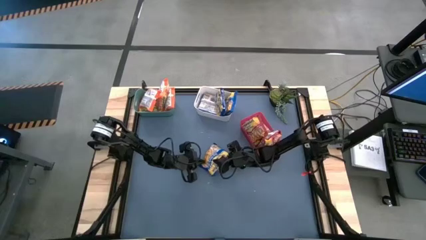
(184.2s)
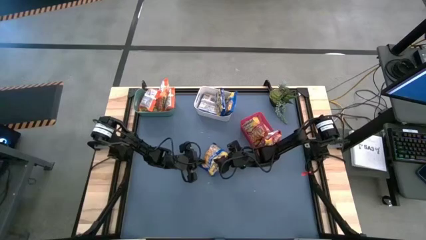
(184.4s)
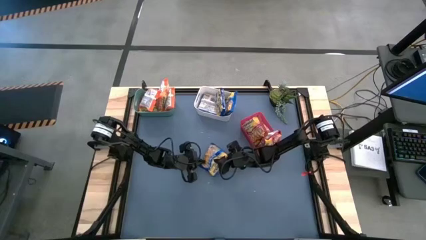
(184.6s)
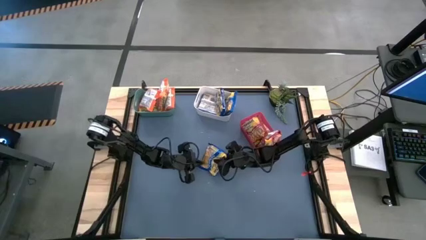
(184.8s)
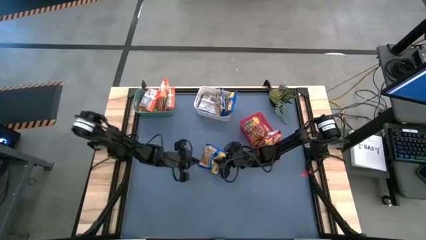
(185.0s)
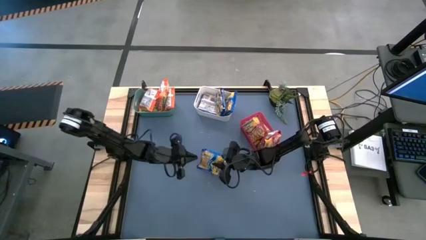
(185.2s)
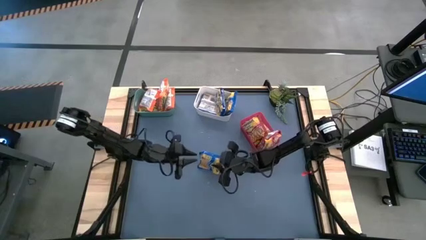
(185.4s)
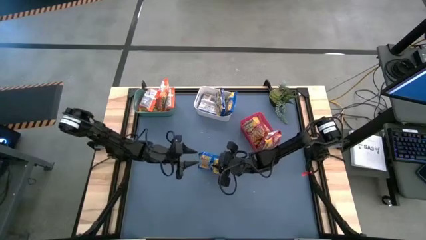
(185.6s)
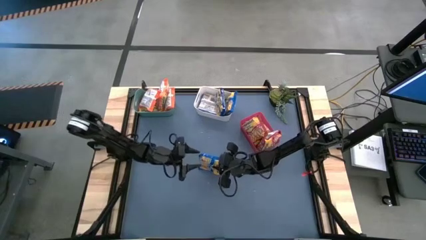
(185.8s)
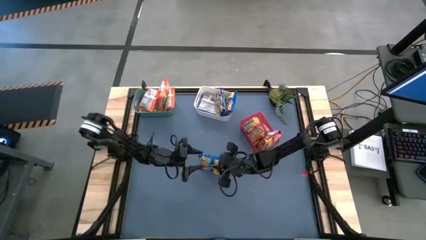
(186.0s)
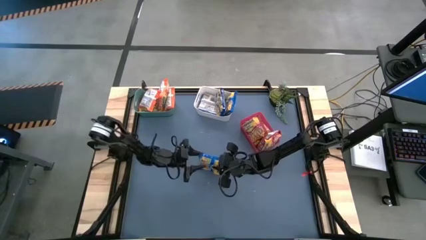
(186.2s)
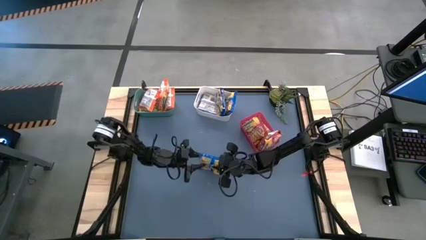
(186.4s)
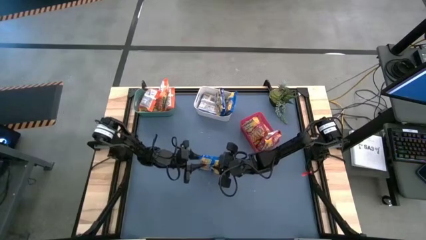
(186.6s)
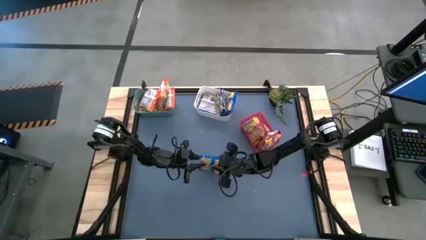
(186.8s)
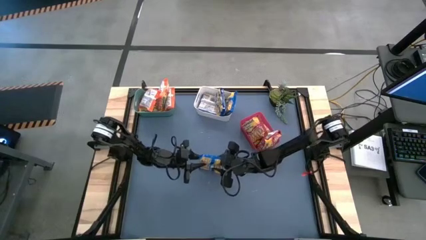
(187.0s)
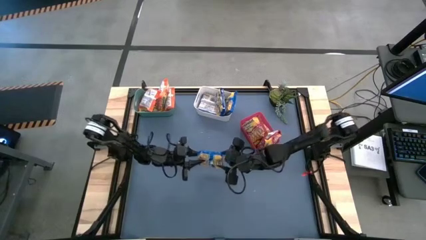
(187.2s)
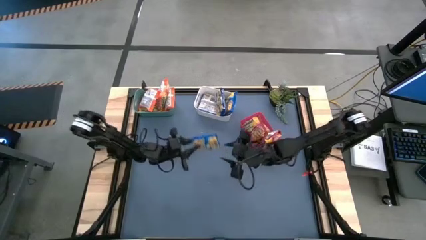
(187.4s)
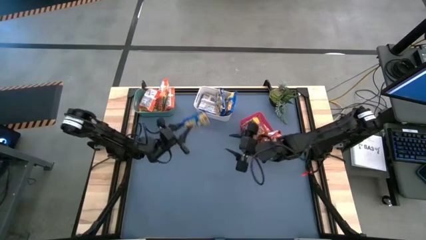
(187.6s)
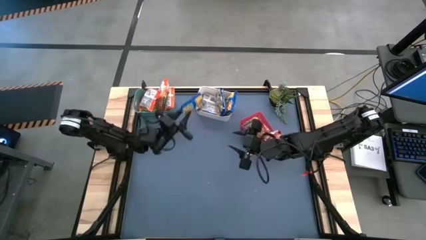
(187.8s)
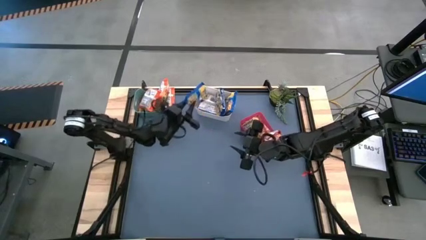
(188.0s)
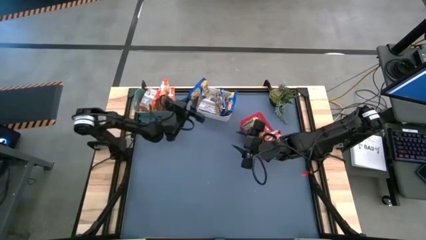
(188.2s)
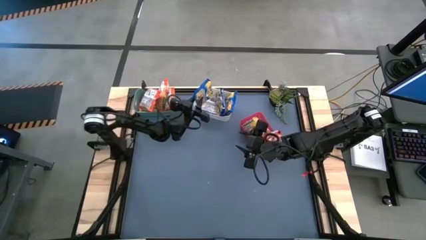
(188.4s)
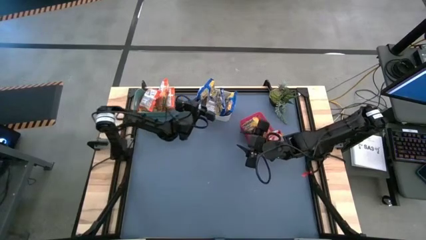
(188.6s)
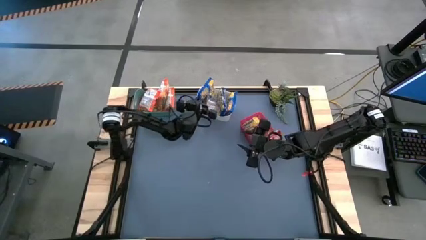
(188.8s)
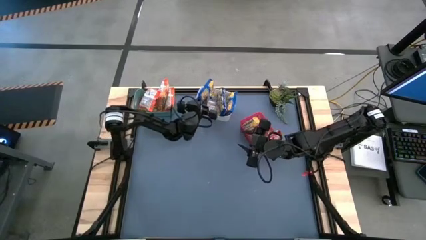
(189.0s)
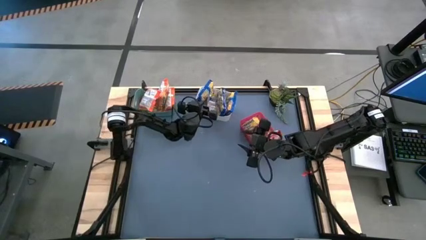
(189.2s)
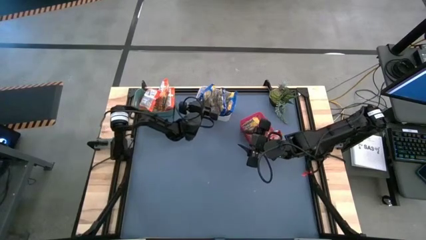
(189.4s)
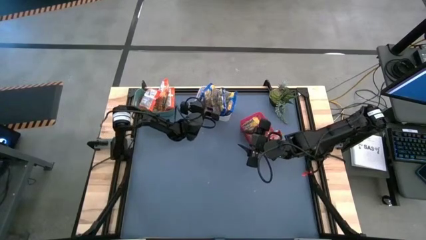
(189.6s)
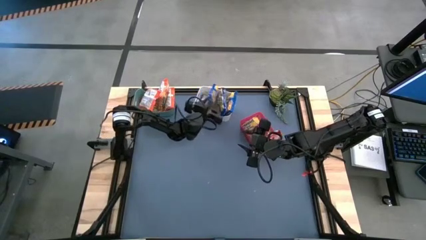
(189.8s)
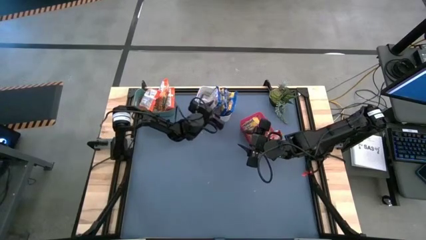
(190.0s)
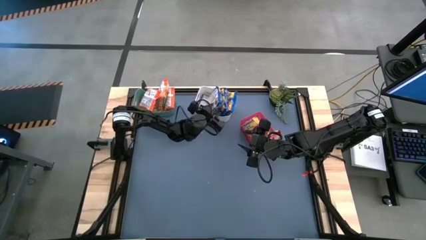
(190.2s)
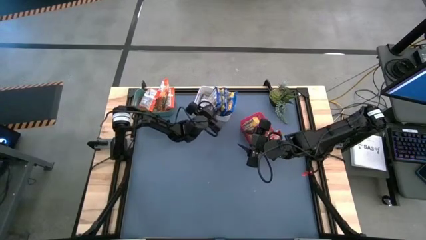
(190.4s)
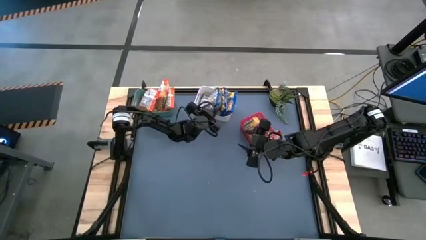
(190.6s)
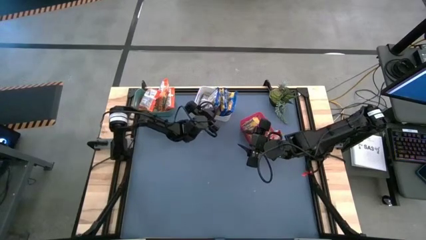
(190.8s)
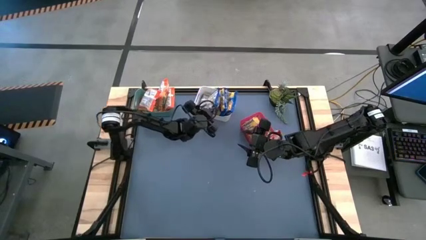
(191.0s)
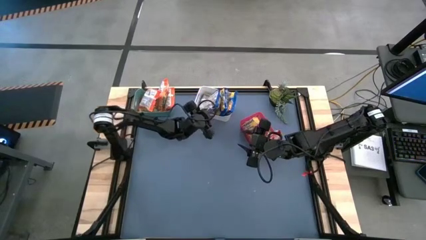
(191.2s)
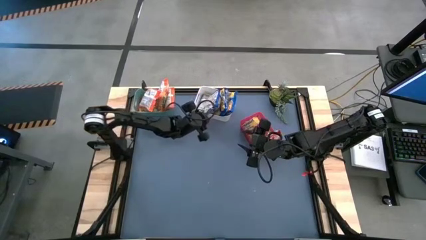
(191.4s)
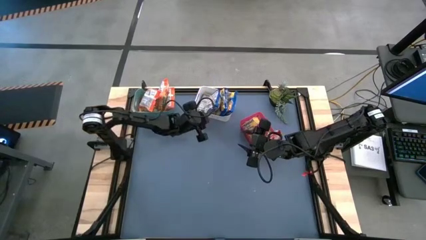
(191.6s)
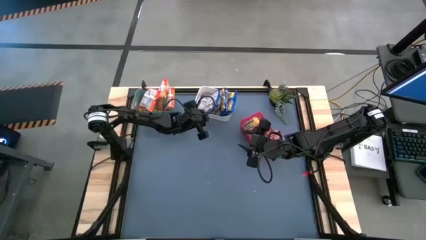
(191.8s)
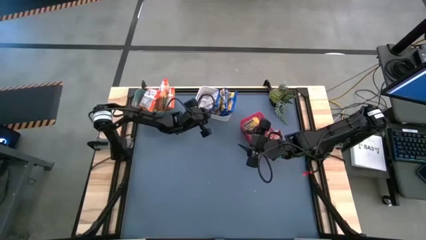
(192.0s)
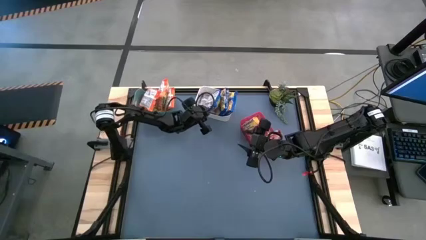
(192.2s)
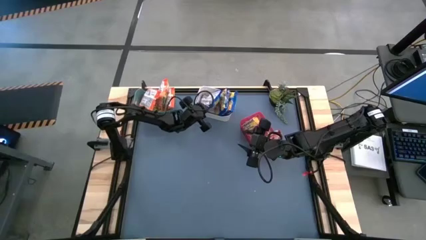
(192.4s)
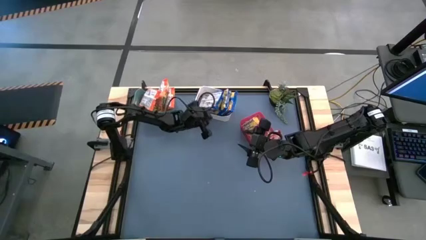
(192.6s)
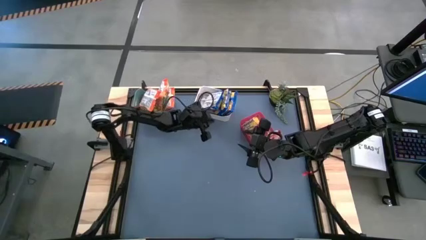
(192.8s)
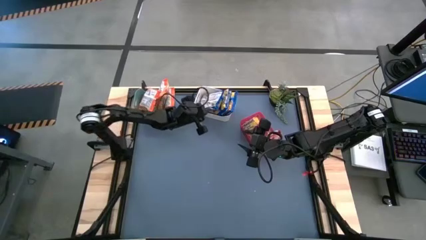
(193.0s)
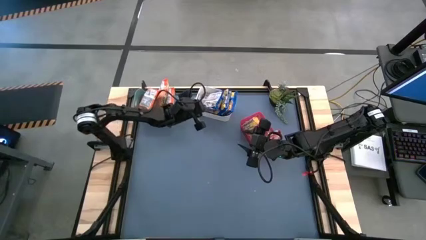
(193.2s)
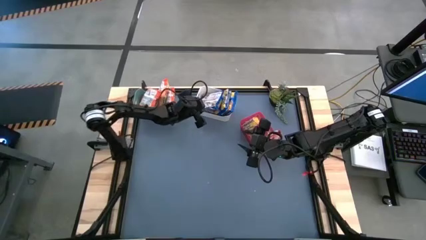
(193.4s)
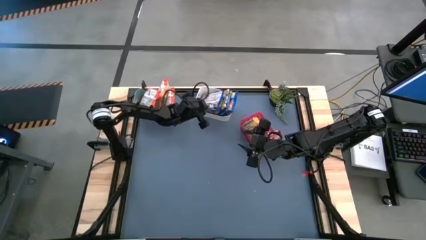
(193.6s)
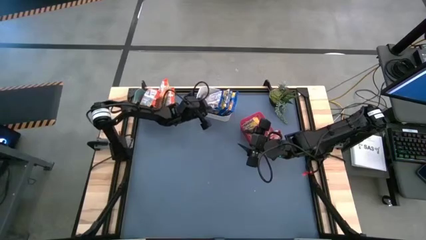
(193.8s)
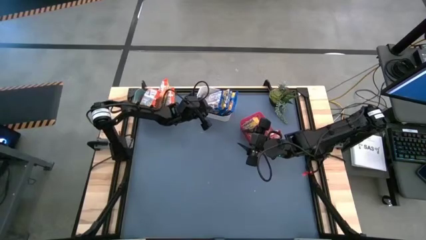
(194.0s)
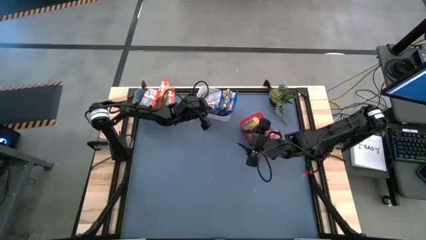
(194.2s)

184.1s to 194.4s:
Task: Sort Maruchan noodles
Put the blue noodle pack into the white bin

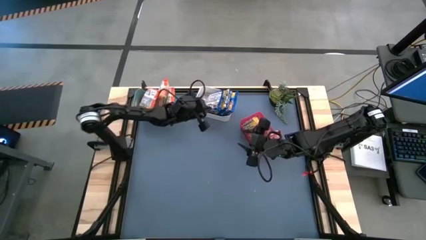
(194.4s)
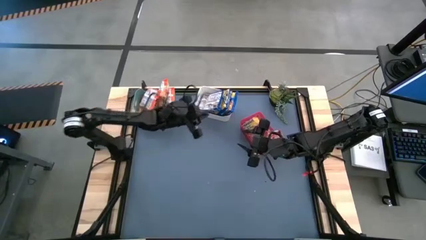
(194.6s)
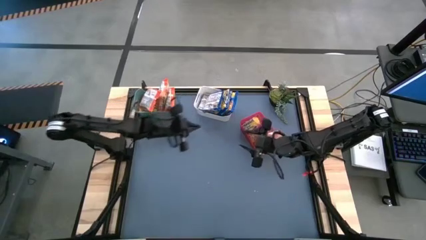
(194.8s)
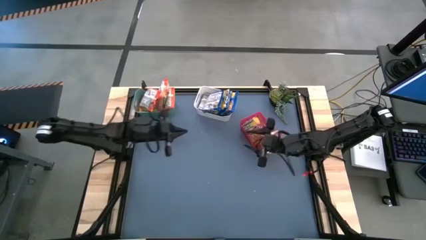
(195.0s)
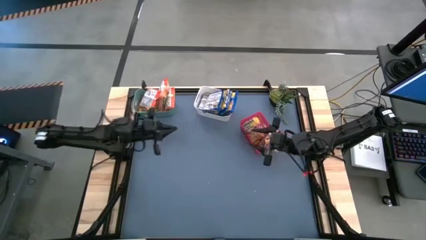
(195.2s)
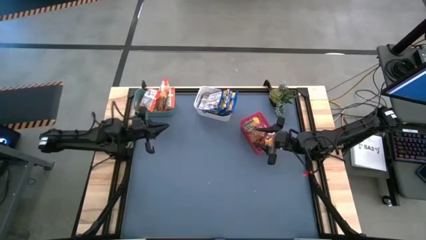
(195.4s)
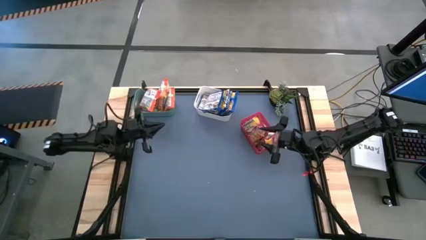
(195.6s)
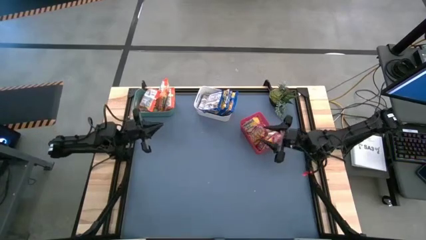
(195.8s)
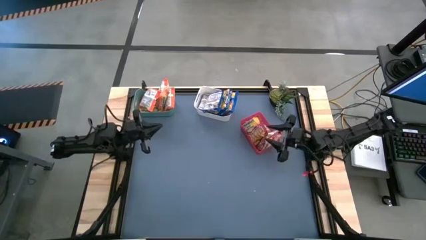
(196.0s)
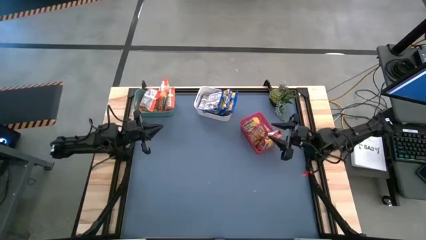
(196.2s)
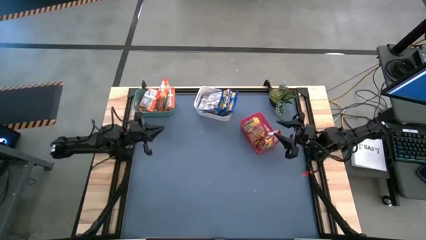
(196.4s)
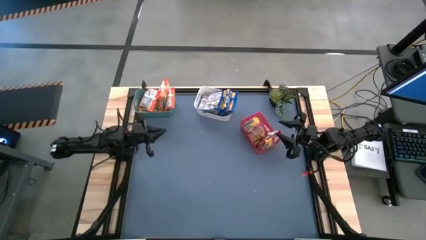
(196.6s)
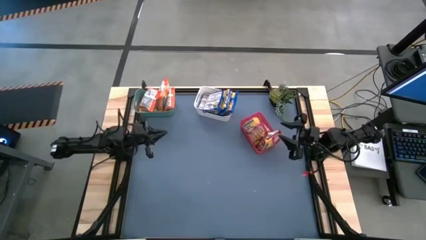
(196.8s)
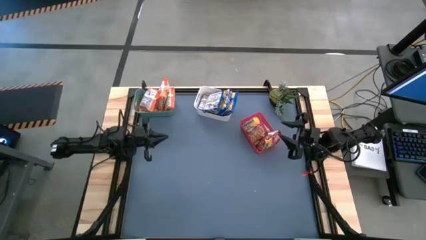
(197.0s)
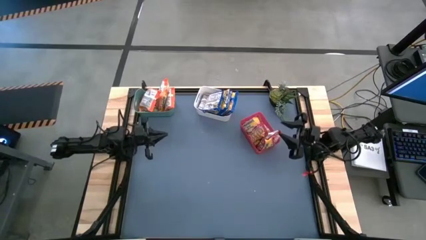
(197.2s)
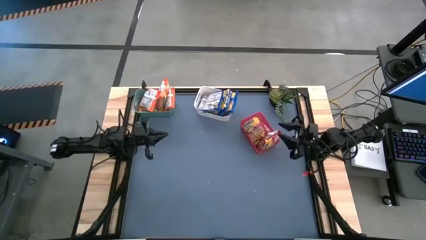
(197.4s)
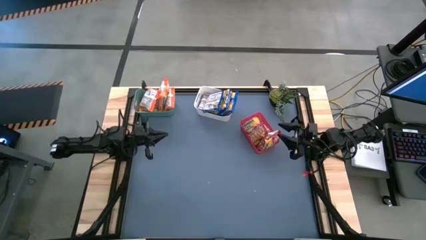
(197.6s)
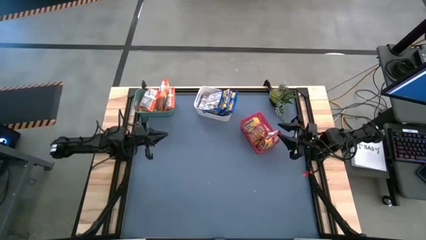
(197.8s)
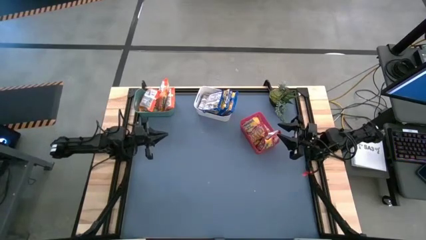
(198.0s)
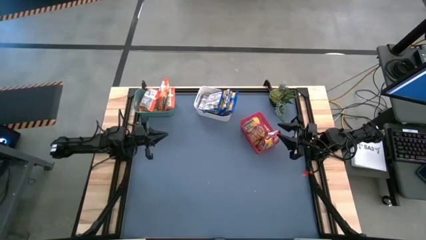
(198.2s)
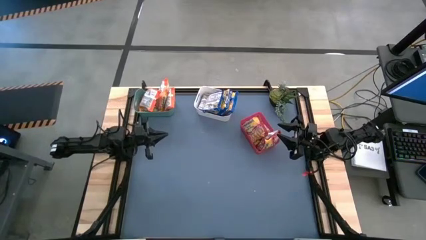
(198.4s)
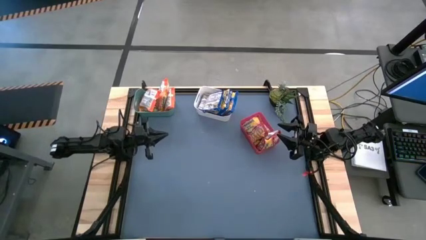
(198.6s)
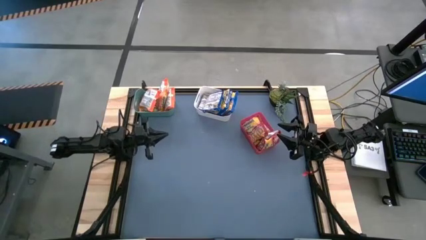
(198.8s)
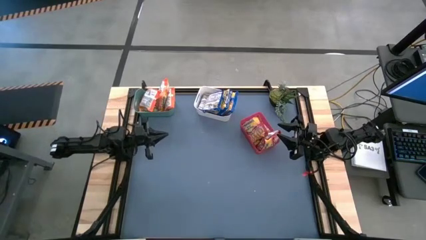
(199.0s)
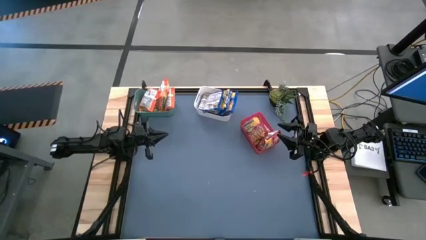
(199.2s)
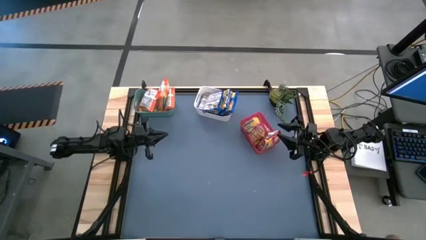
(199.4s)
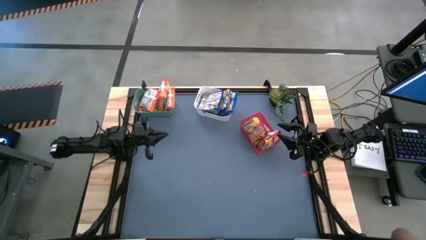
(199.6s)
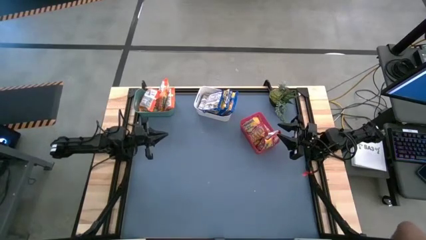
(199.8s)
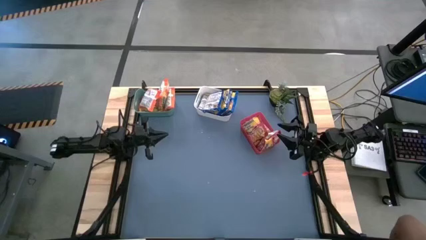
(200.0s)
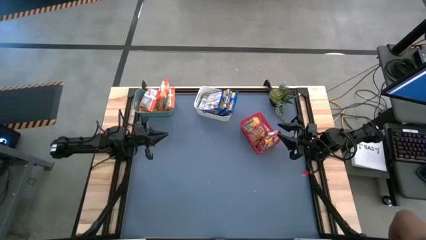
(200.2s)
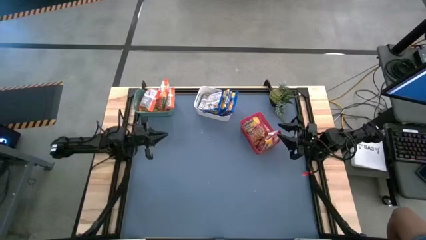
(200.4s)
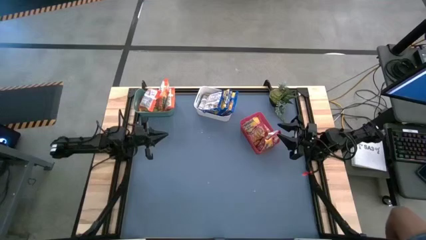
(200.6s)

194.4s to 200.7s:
Return to Home Position
